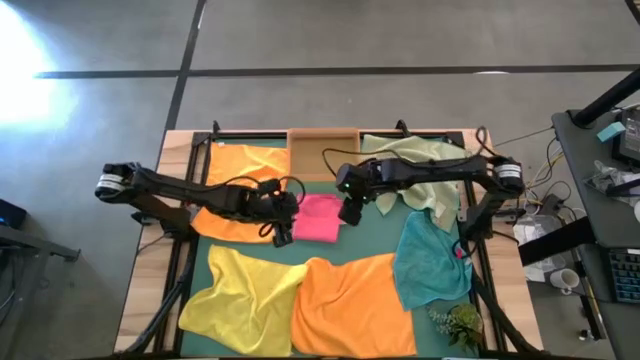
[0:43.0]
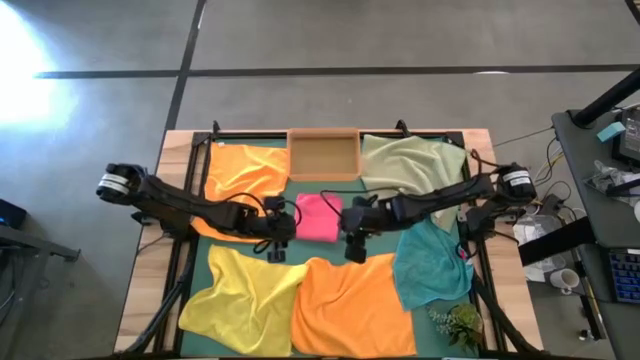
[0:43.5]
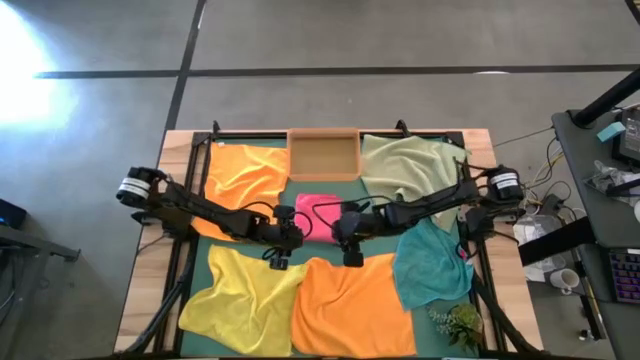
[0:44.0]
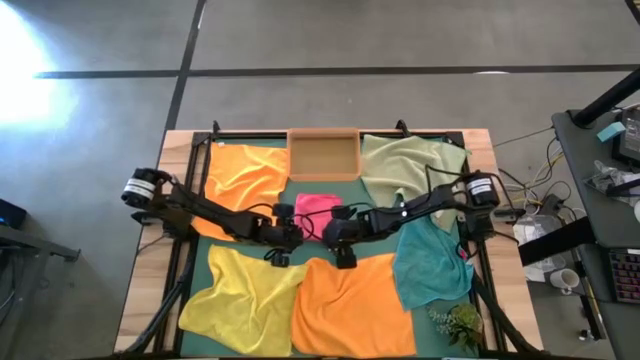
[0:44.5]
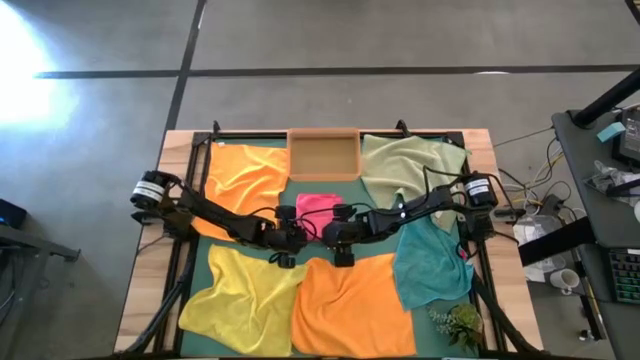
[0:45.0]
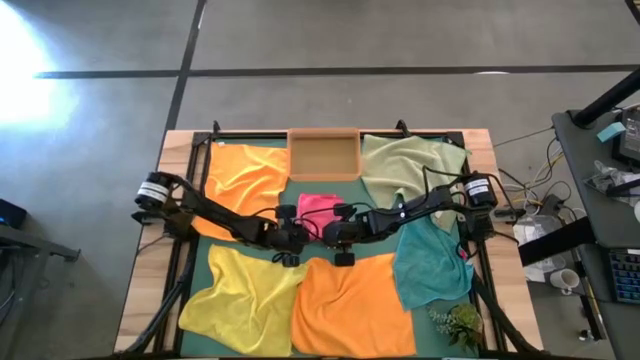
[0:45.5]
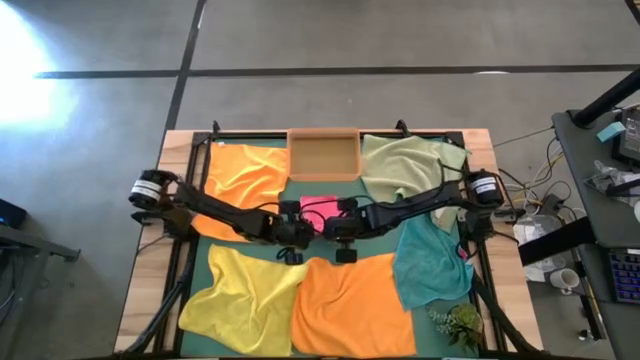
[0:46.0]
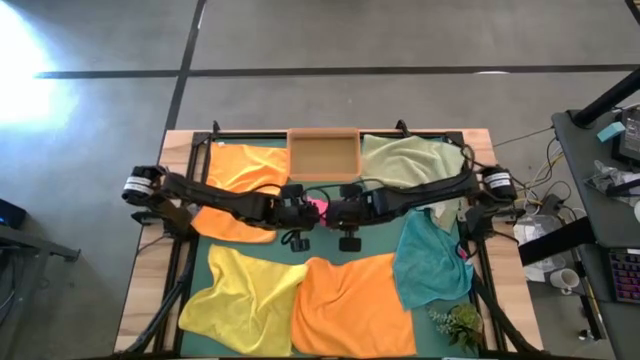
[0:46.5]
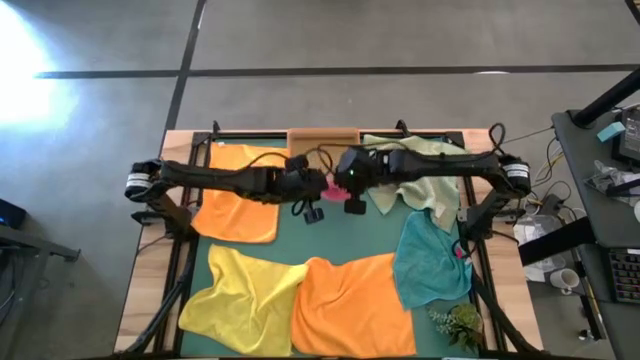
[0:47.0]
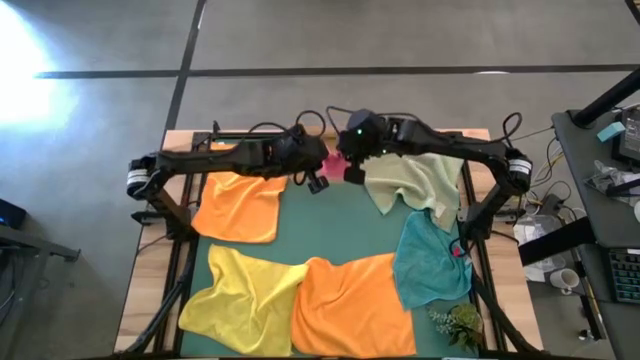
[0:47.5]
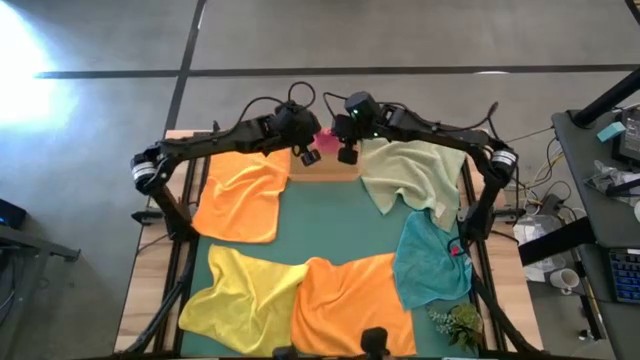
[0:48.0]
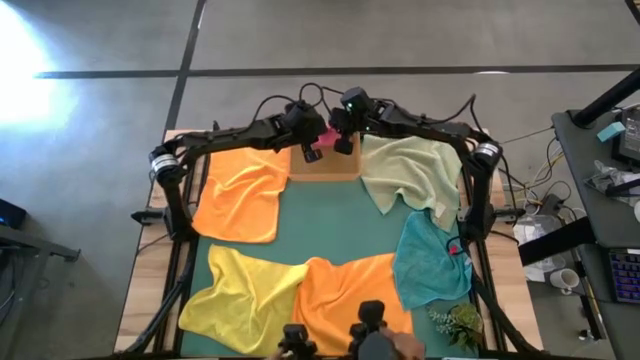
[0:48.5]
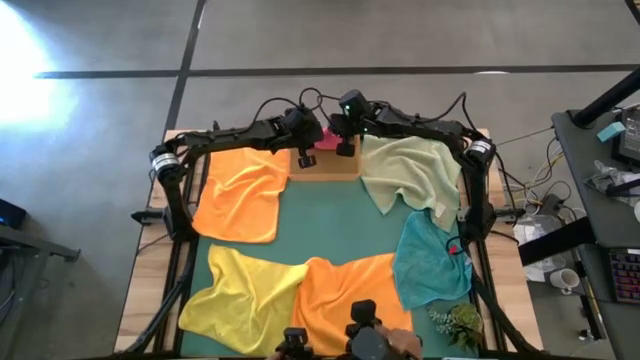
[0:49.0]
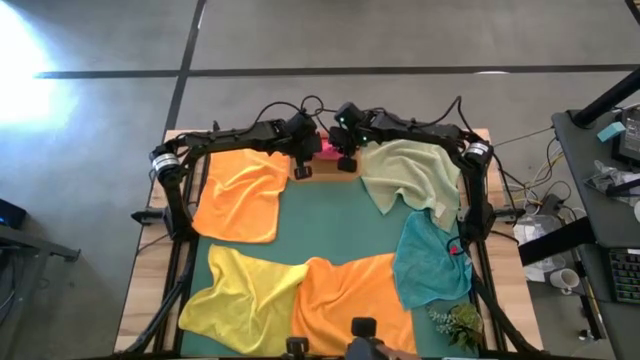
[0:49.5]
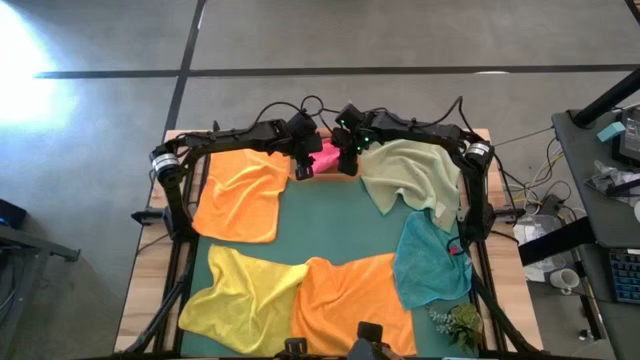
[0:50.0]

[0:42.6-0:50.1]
Task: Fold microfiber towels
Put the pink towel into the orange bin

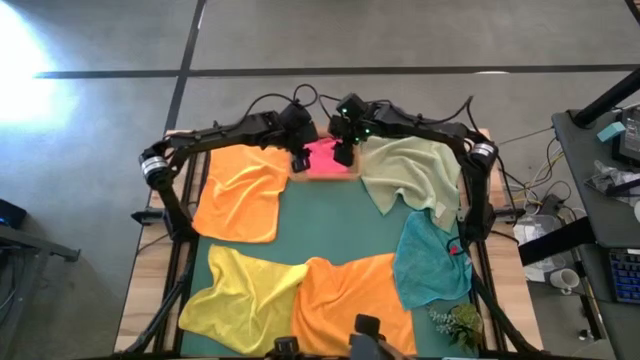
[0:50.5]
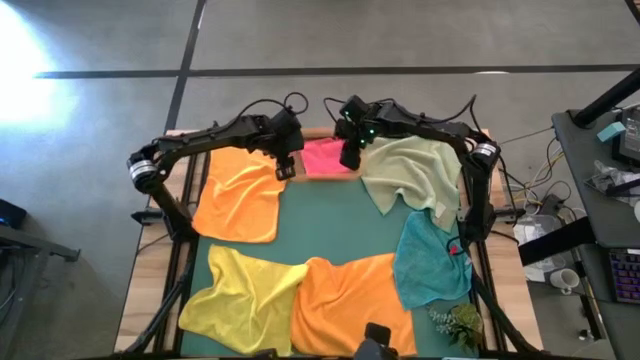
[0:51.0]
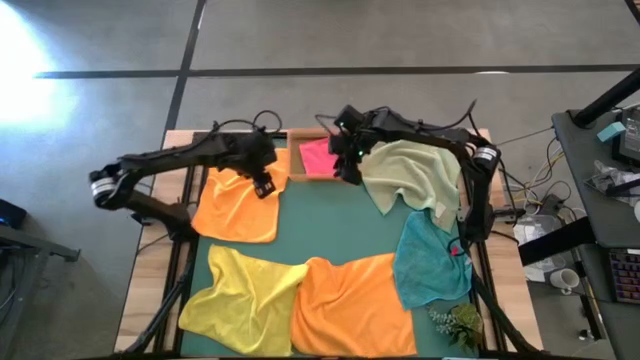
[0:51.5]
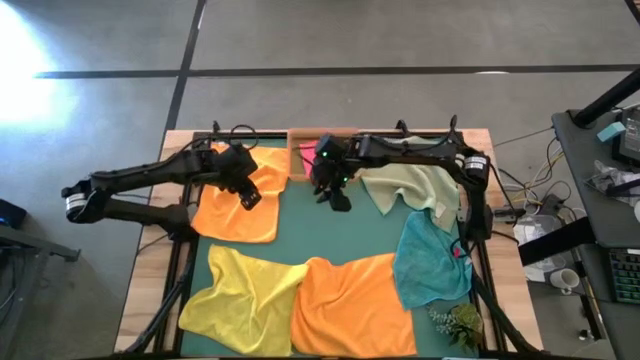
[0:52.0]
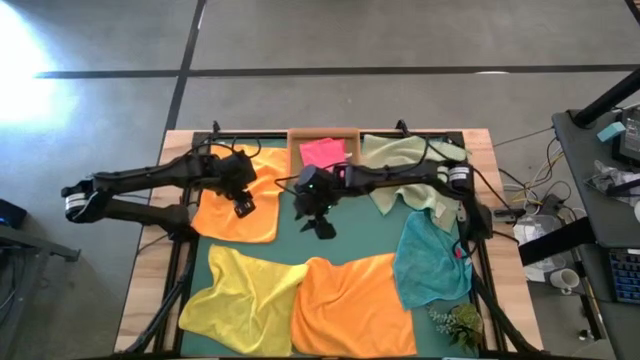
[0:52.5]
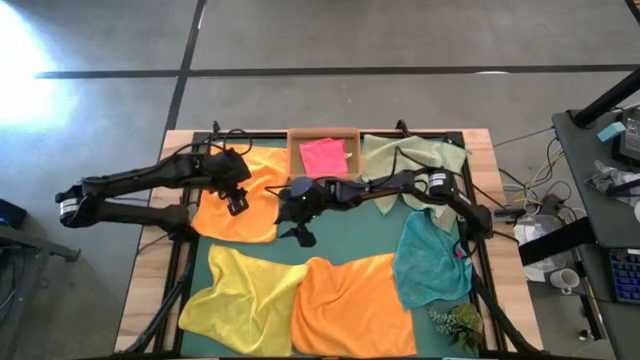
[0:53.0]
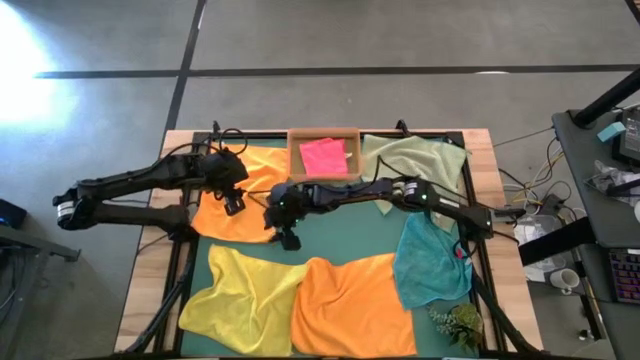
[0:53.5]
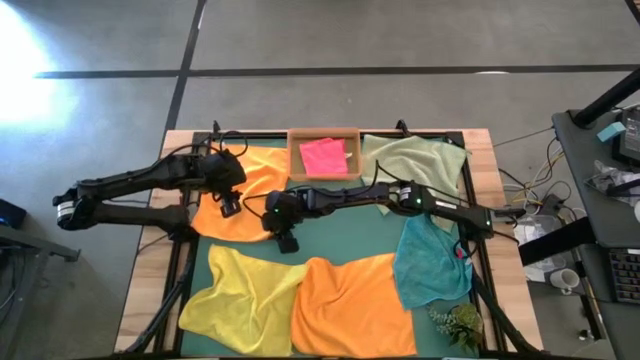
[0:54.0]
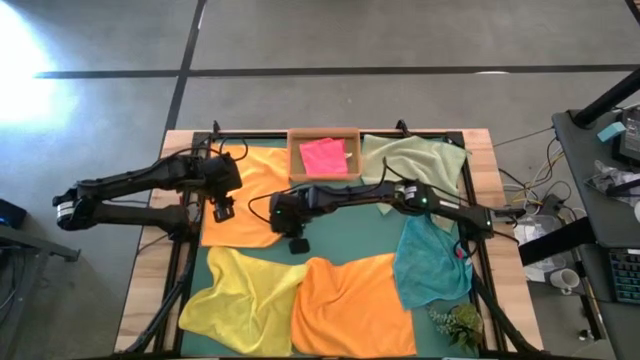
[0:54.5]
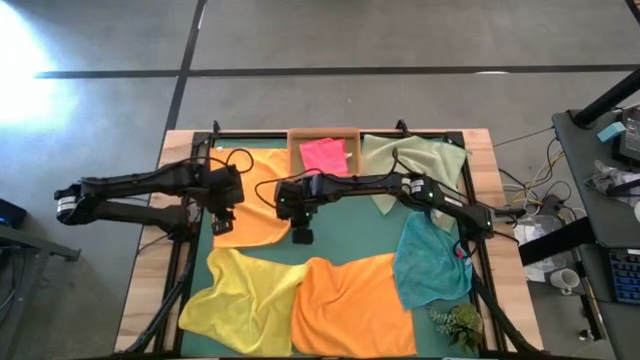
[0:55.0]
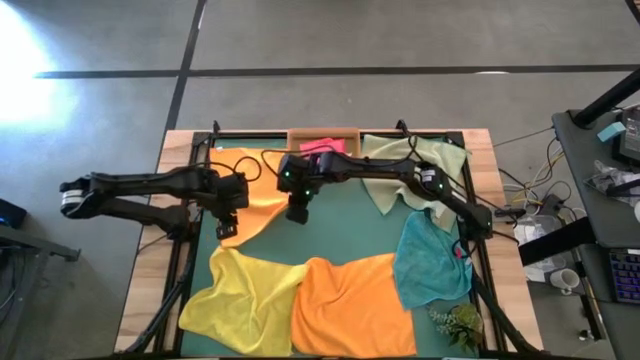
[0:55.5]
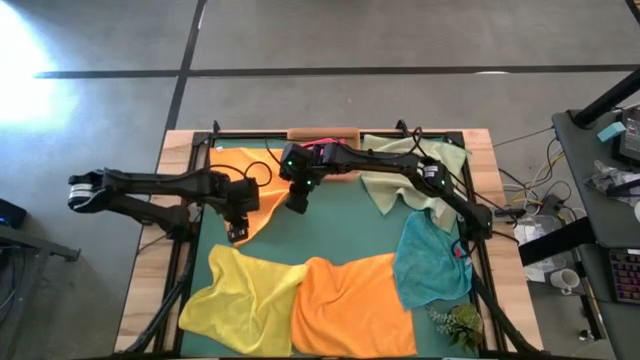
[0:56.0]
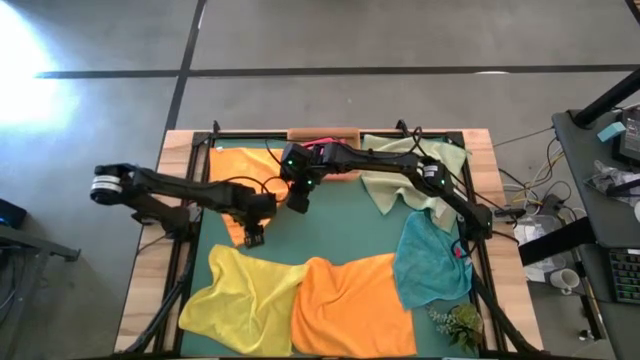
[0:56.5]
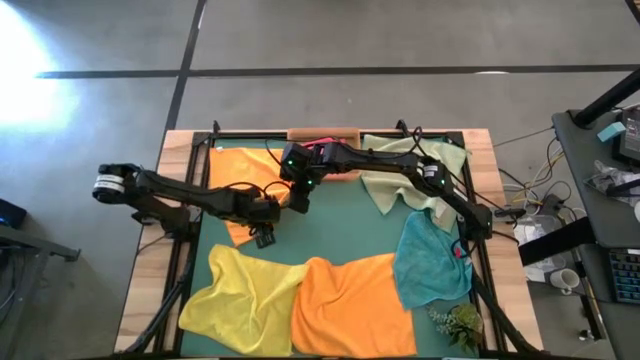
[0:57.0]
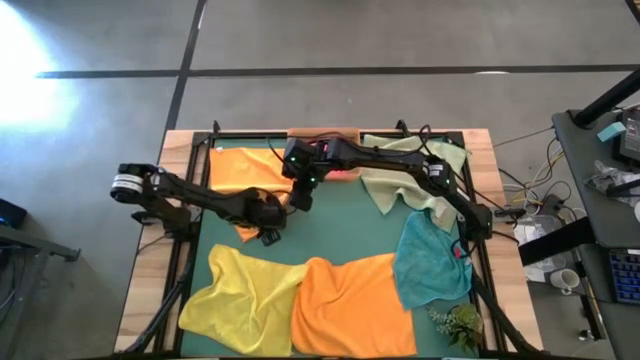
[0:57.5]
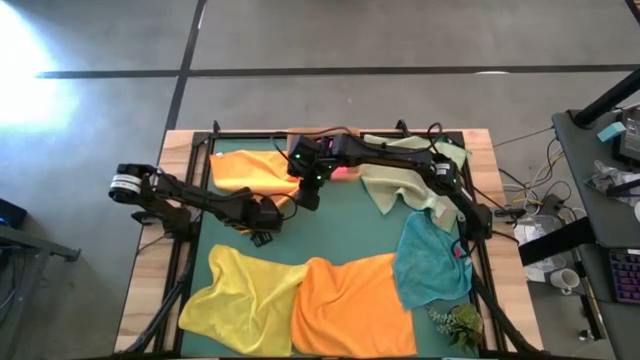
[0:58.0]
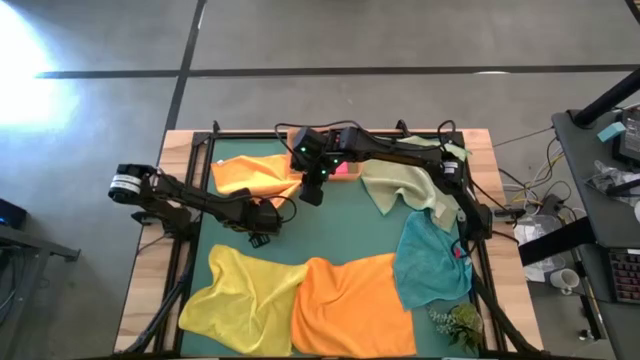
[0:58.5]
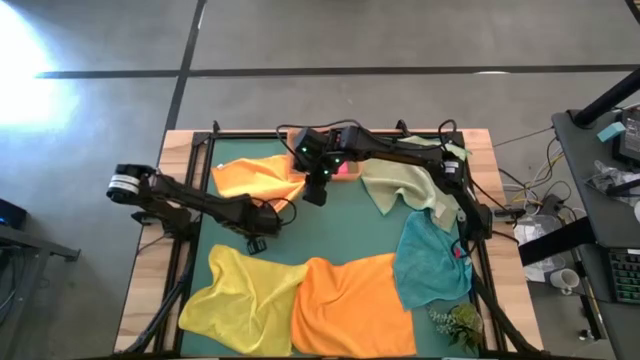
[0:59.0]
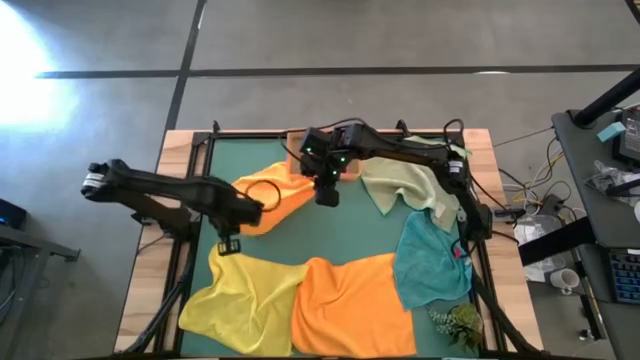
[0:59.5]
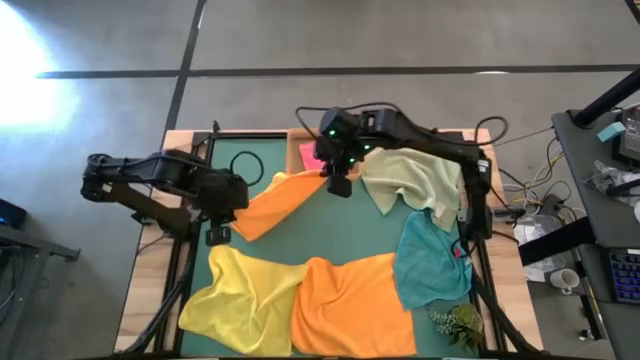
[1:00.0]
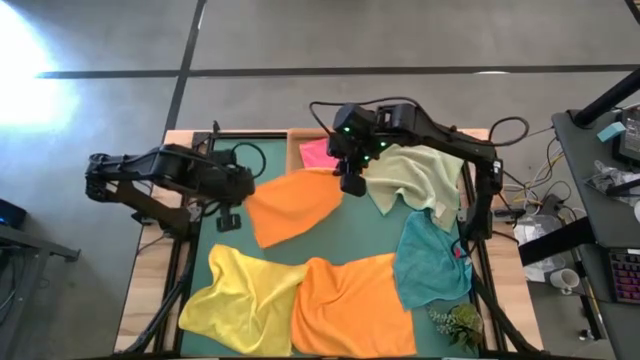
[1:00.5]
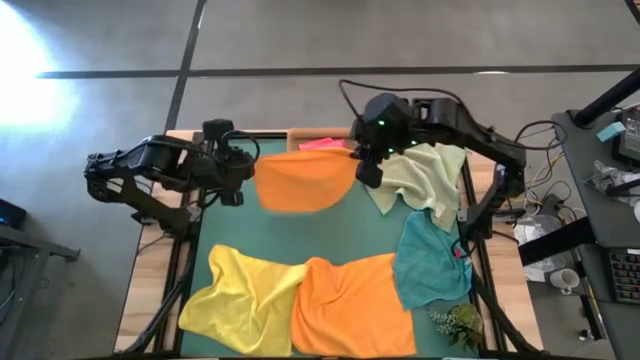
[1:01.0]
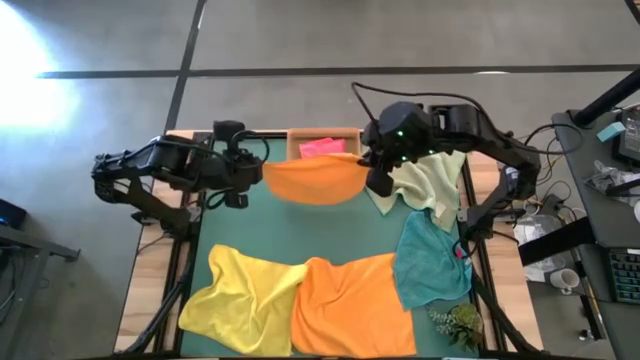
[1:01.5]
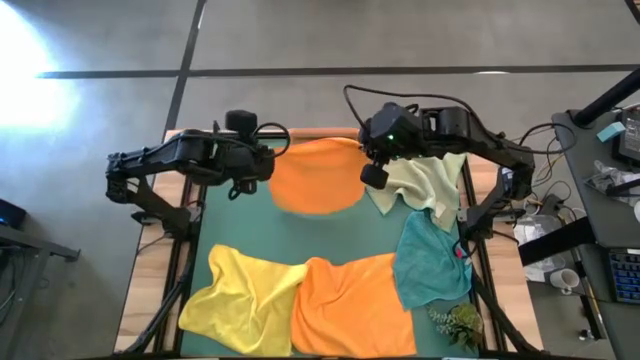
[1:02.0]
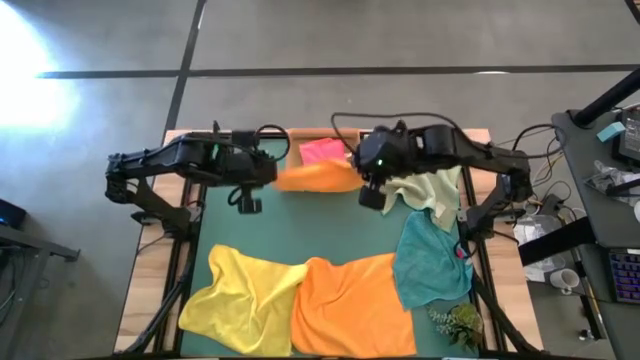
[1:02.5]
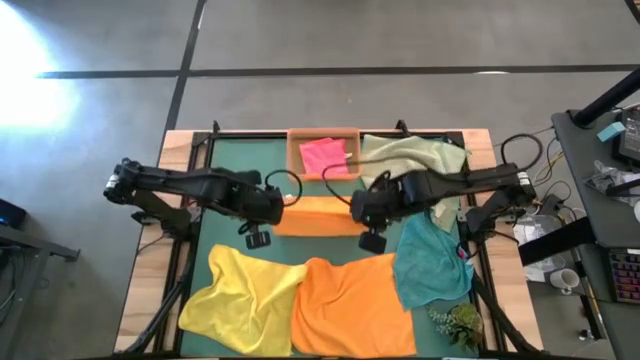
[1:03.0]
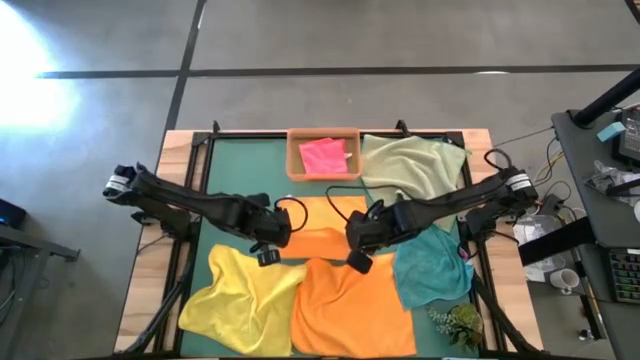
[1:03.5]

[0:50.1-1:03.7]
Fold the top orange towel
